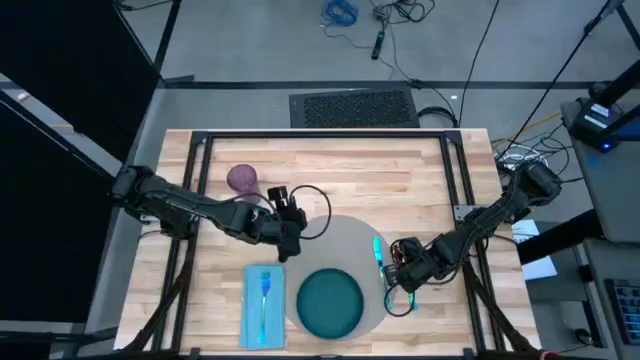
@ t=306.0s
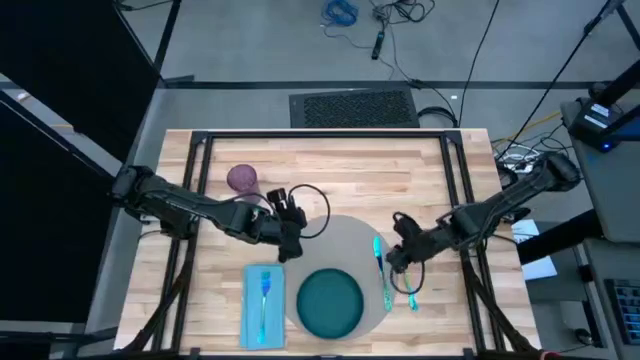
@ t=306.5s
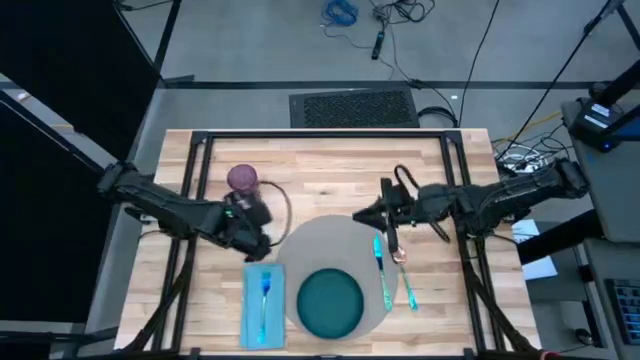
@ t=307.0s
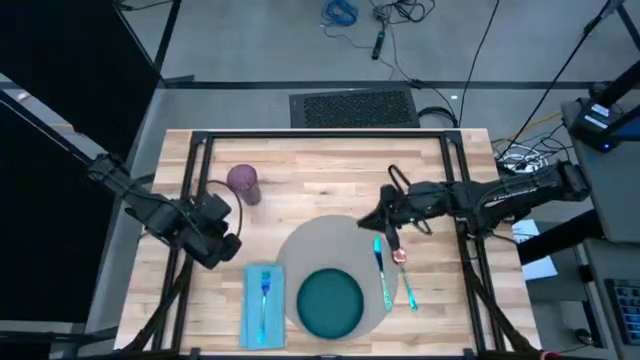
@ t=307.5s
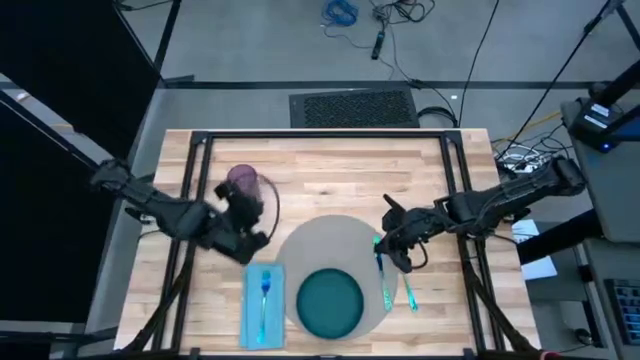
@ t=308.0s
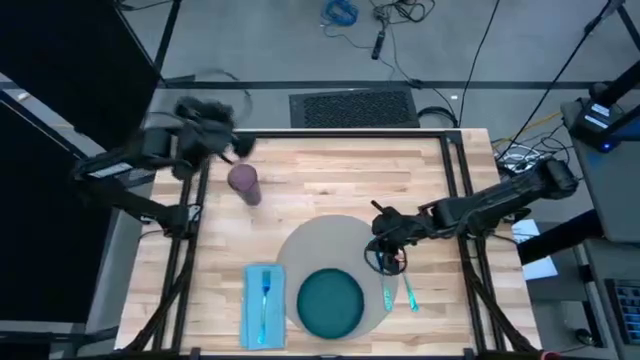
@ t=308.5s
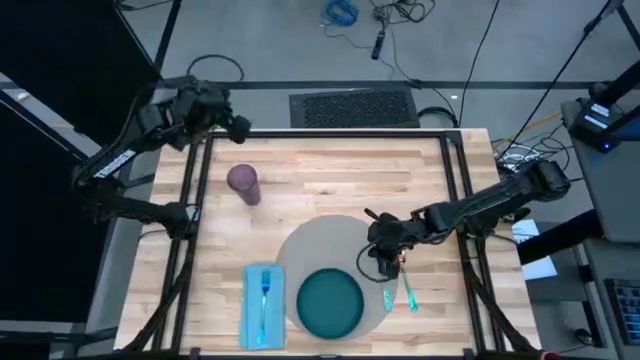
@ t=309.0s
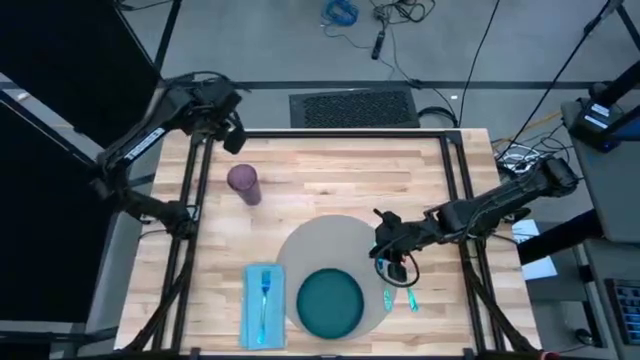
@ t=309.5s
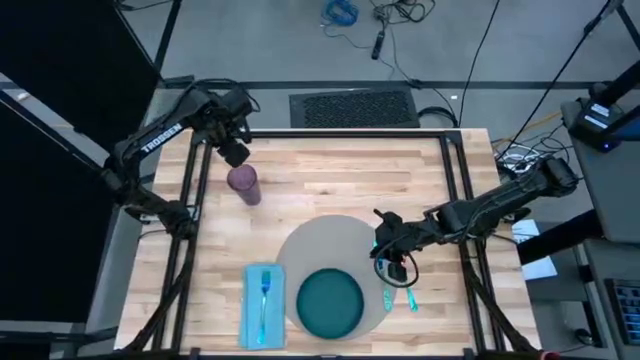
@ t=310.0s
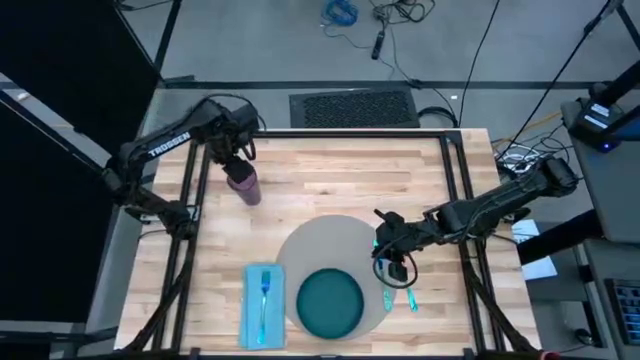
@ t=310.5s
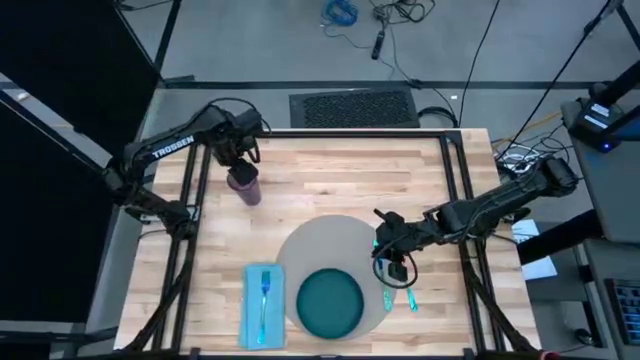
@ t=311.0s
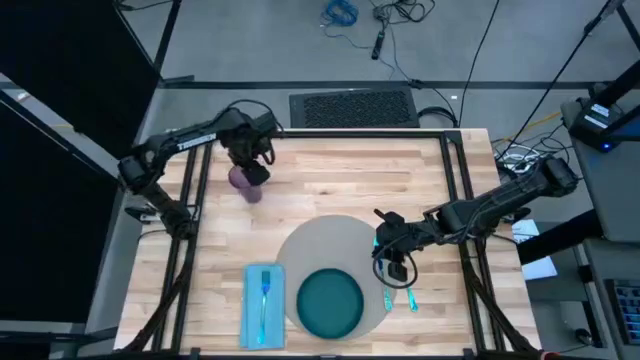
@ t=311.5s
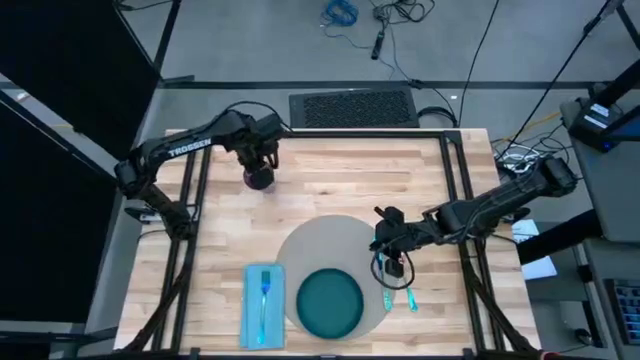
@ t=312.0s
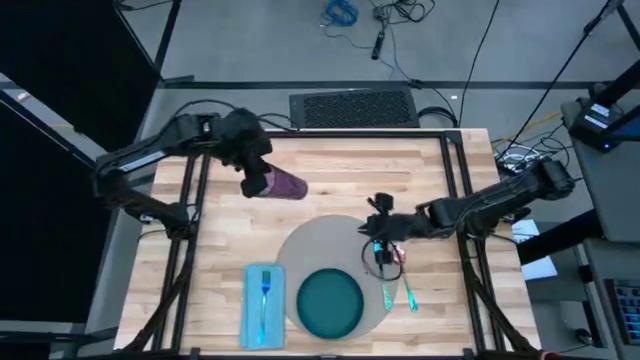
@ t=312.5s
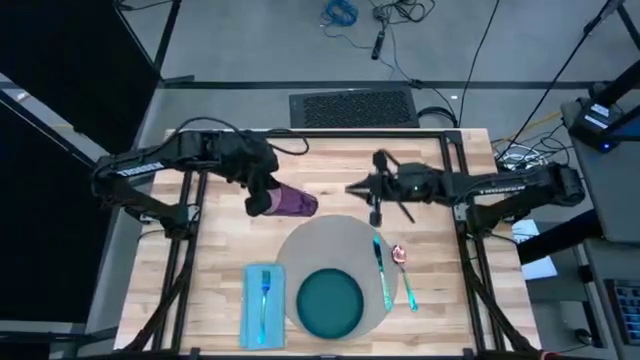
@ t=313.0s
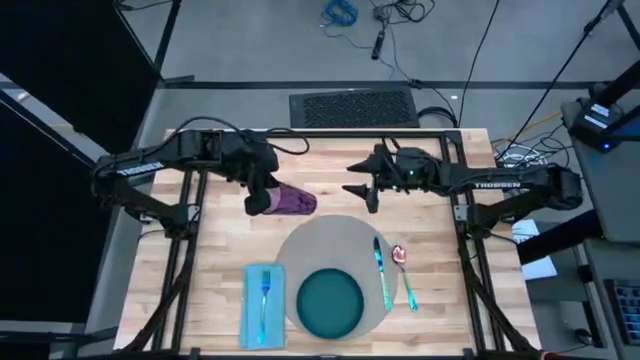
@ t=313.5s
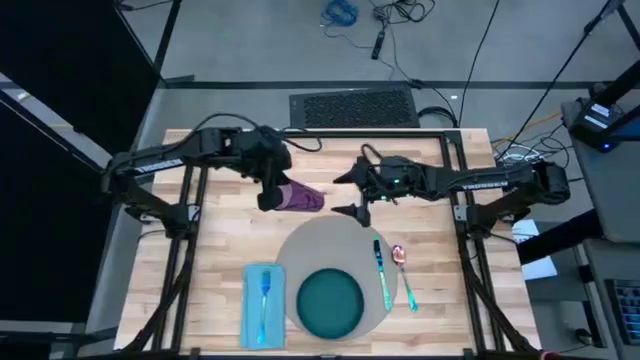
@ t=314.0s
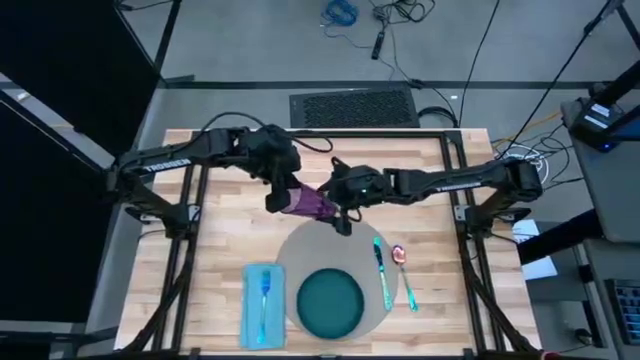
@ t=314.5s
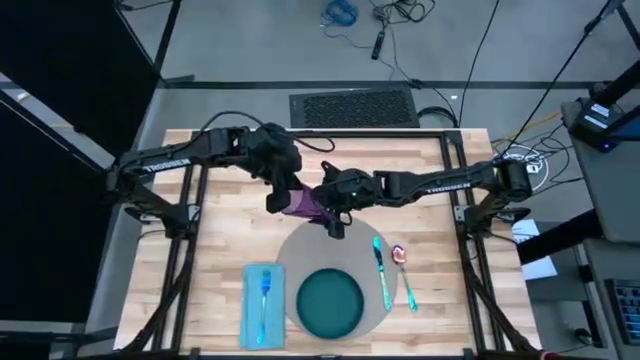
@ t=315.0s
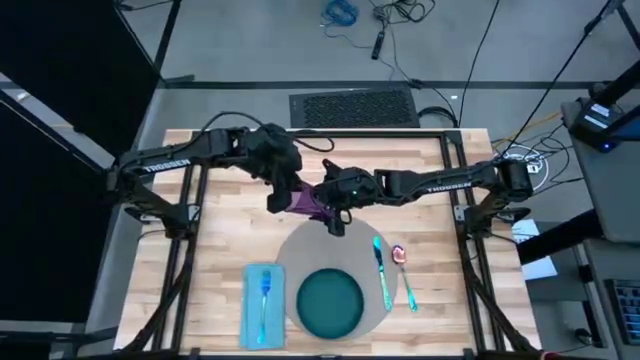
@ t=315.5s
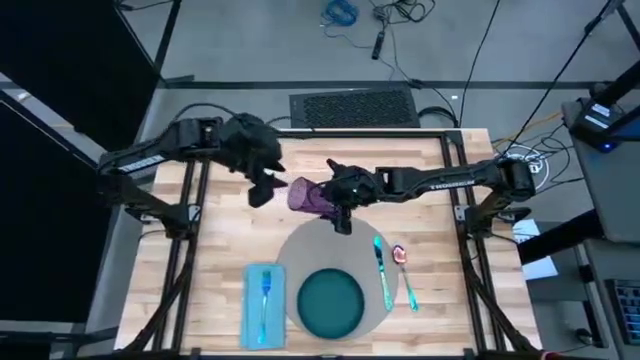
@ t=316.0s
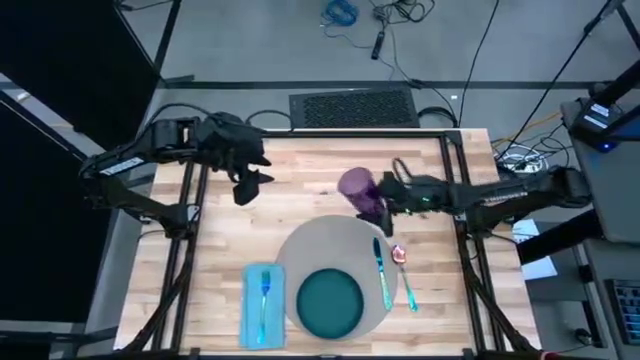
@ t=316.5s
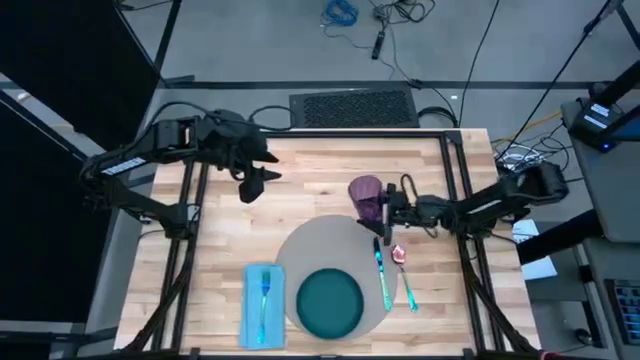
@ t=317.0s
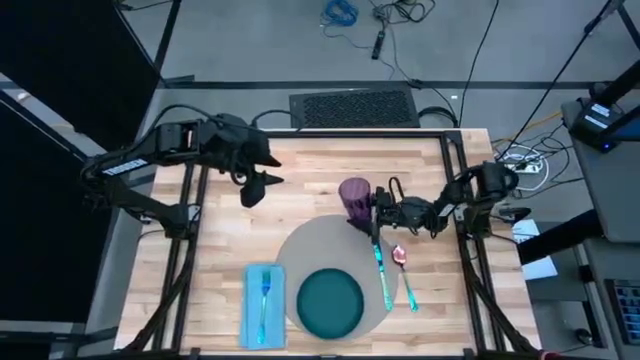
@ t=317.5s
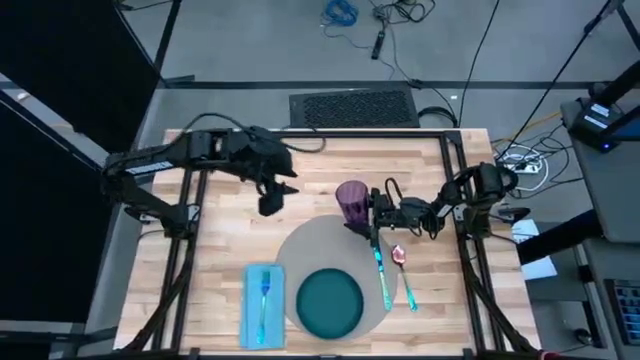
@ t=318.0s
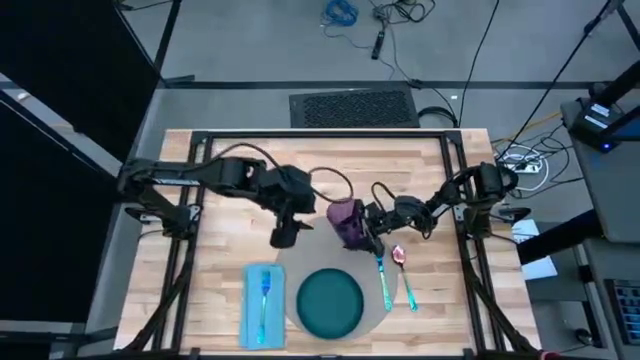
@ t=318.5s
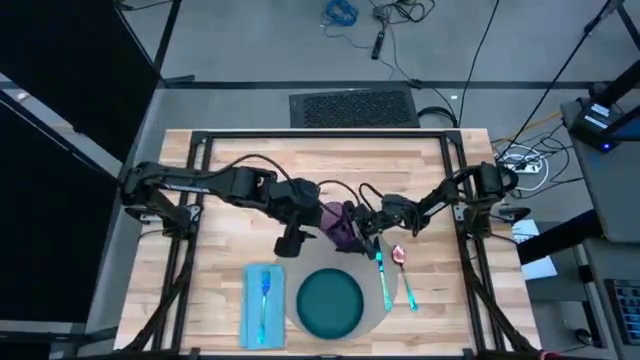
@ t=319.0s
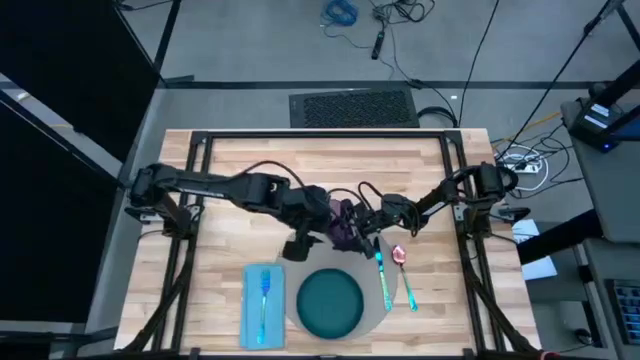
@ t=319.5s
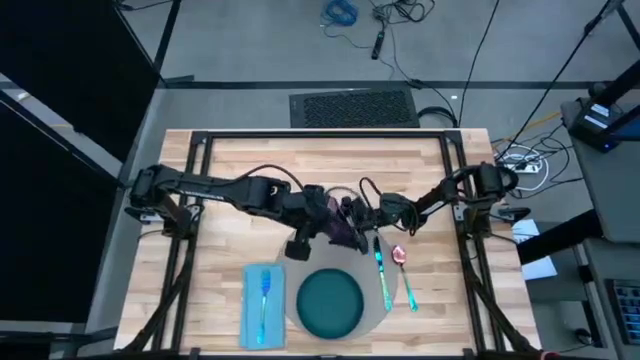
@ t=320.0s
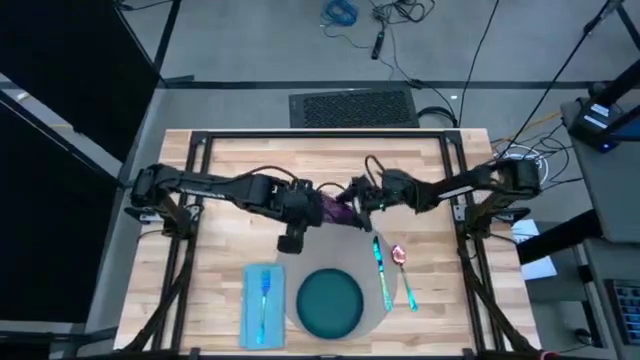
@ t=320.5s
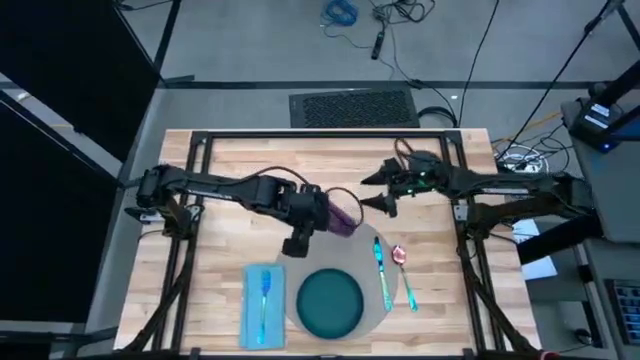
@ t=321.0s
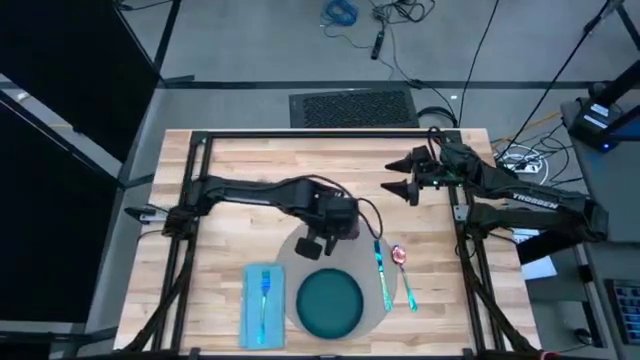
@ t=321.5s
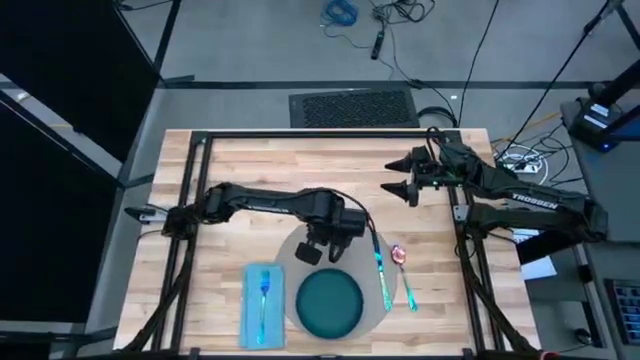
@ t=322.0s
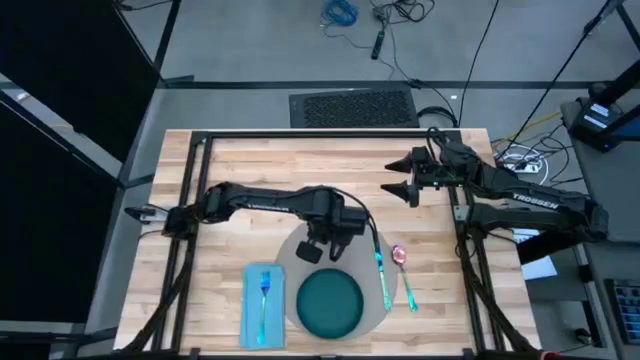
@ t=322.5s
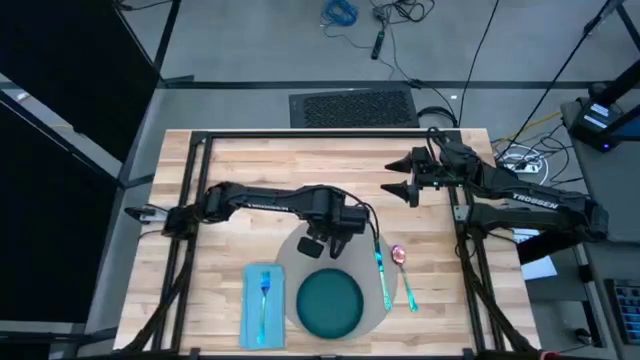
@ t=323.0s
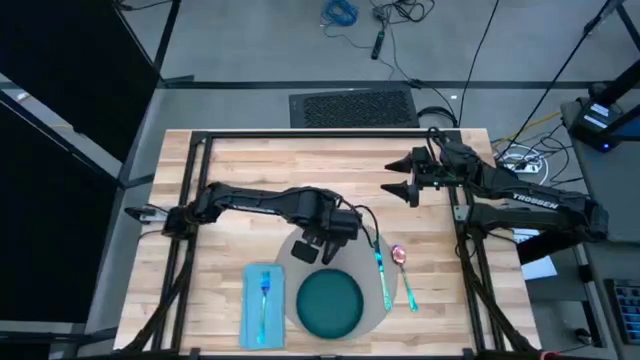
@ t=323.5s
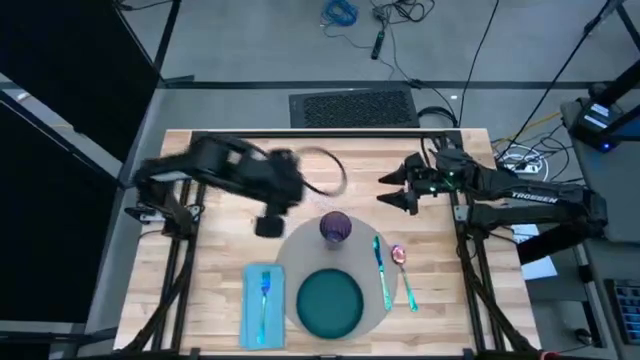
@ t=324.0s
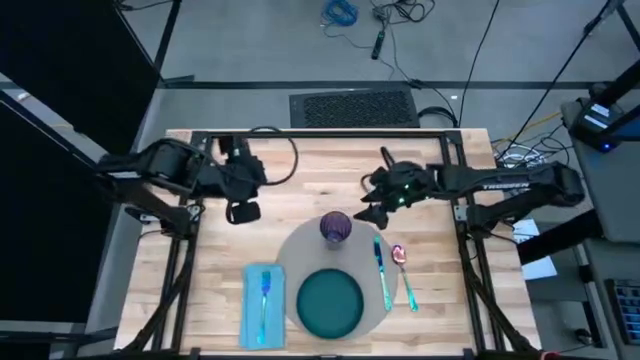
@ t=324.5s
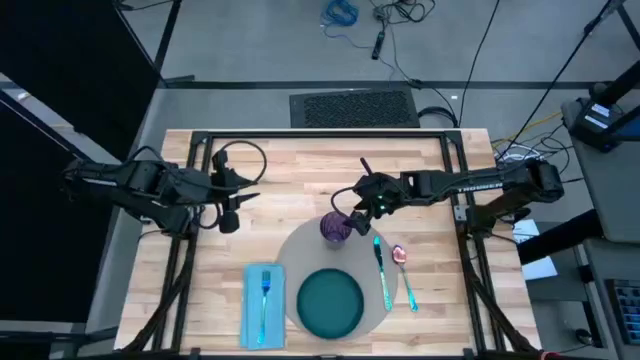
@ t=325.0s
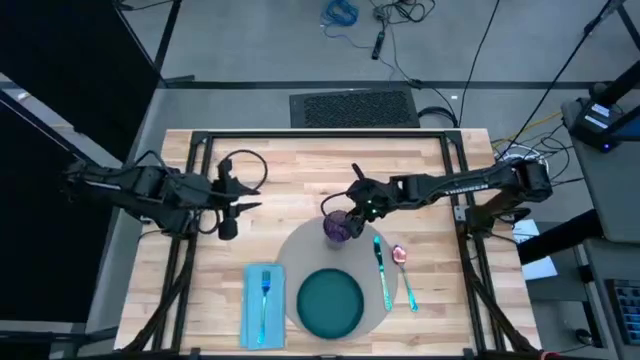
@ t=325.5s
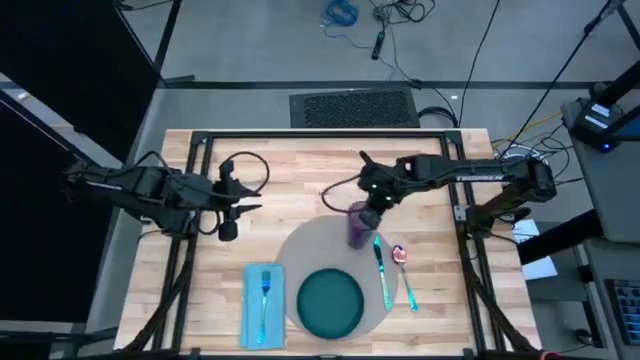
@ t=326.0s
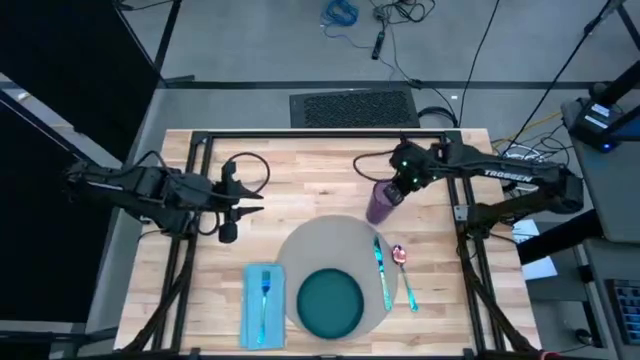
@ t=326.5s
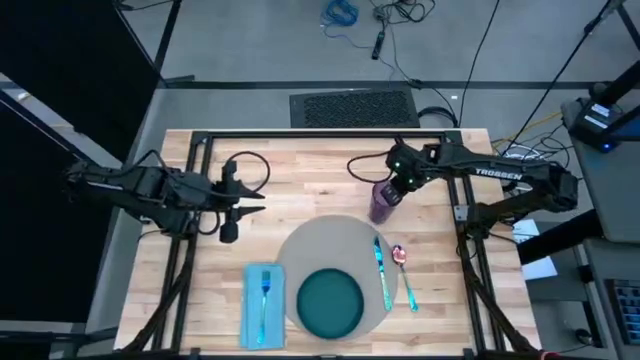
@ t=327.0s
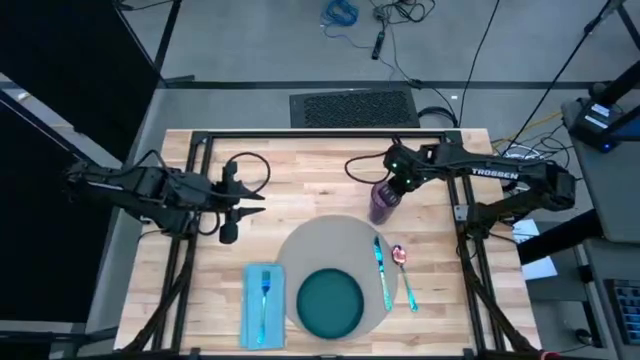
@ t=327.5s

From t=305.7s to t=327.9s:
Task: Set table place
Move the purple cup to the top right of the table
